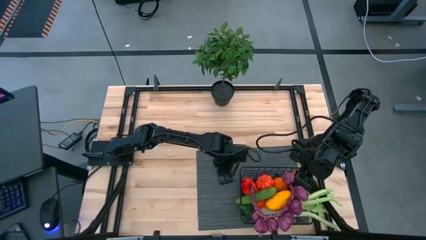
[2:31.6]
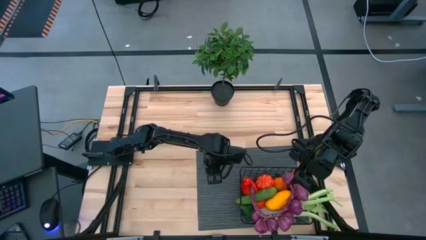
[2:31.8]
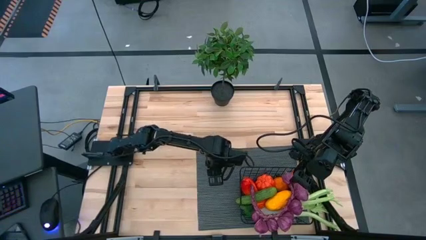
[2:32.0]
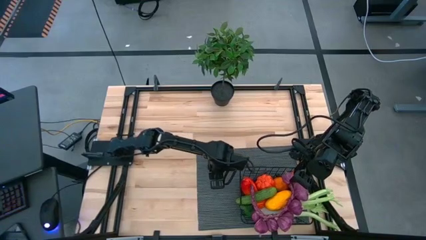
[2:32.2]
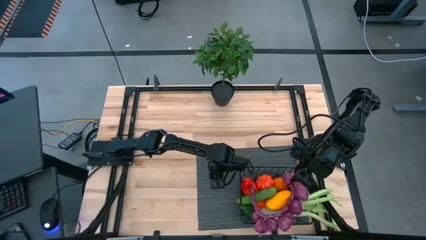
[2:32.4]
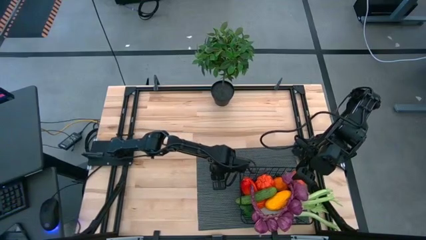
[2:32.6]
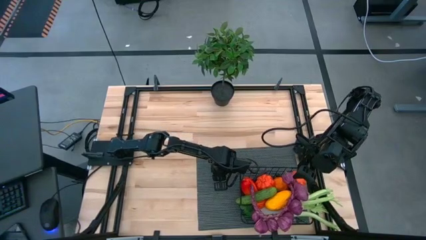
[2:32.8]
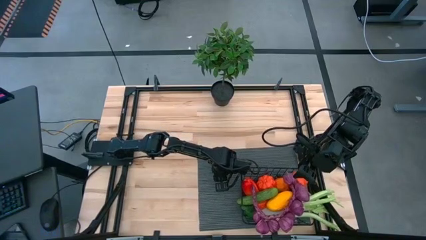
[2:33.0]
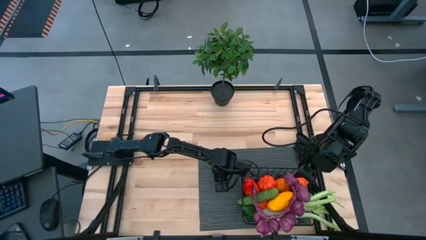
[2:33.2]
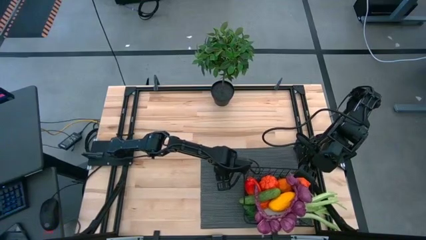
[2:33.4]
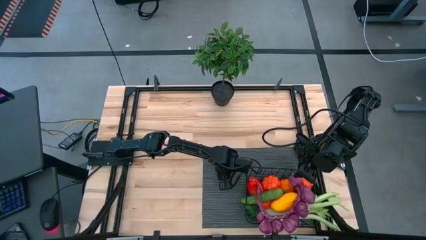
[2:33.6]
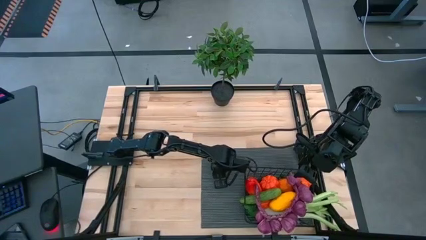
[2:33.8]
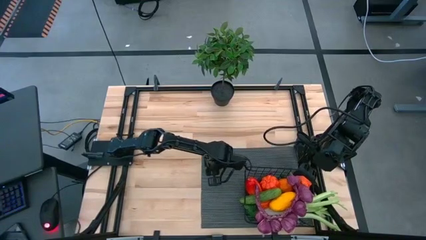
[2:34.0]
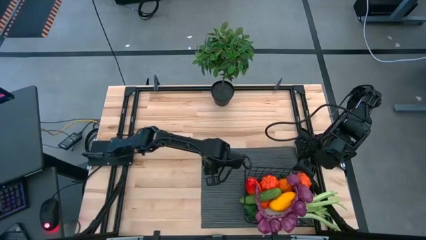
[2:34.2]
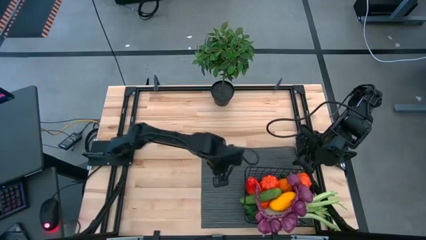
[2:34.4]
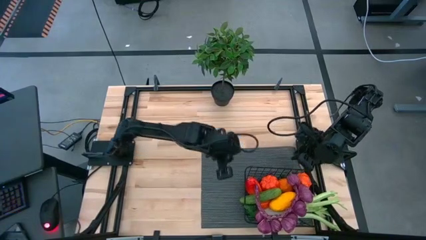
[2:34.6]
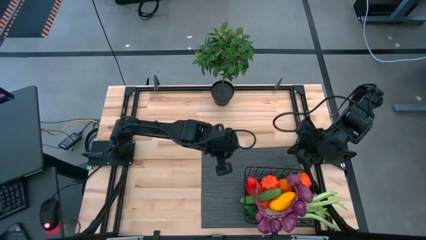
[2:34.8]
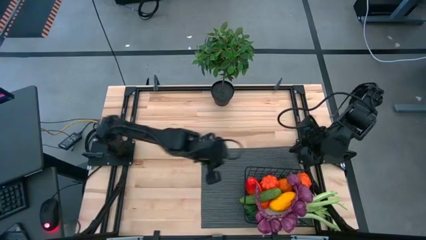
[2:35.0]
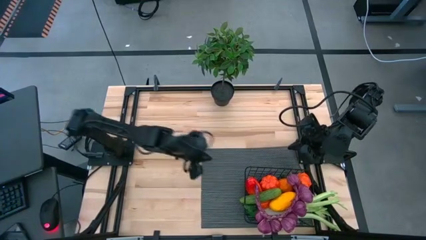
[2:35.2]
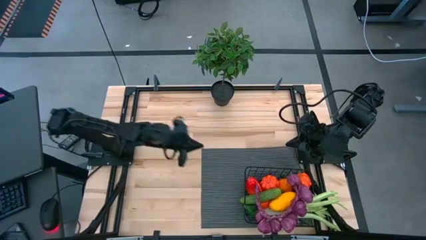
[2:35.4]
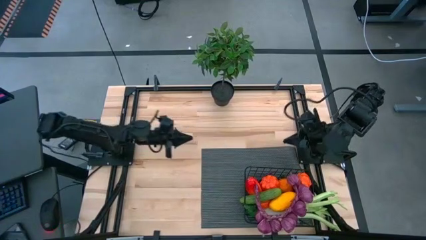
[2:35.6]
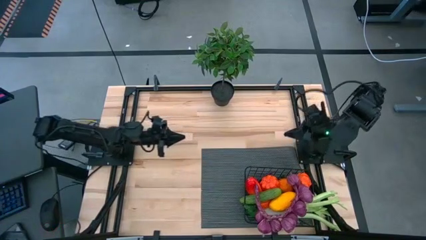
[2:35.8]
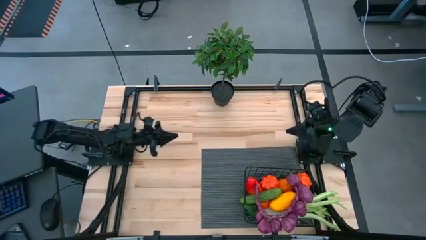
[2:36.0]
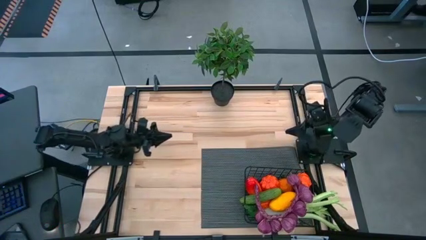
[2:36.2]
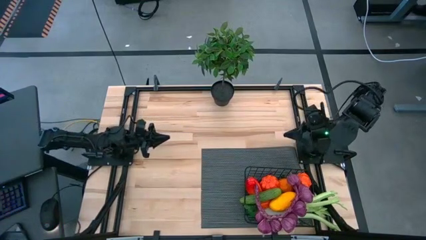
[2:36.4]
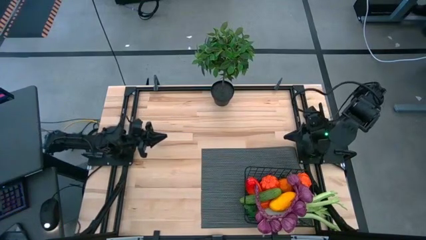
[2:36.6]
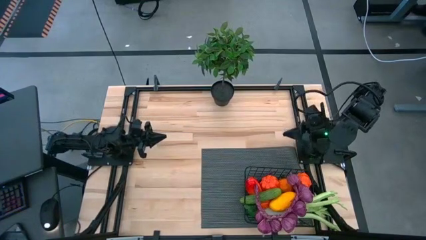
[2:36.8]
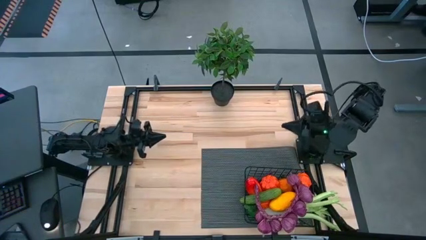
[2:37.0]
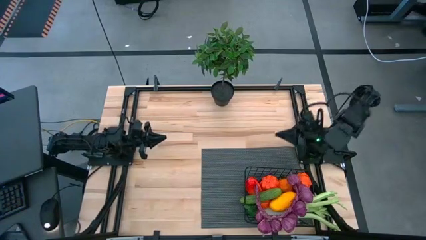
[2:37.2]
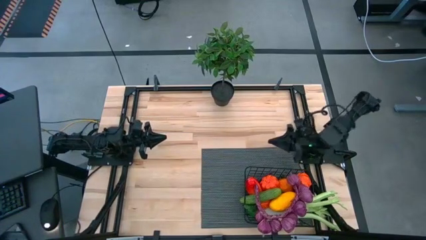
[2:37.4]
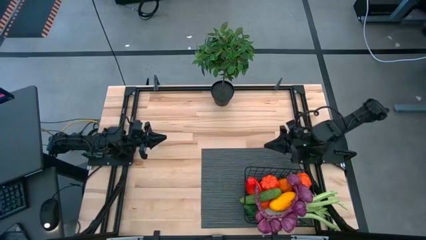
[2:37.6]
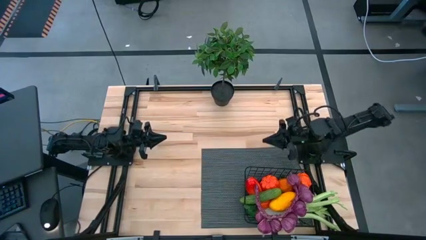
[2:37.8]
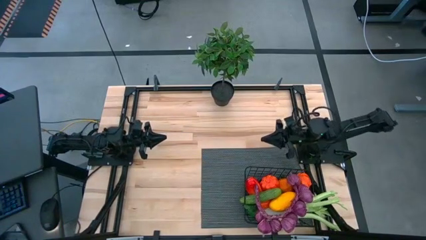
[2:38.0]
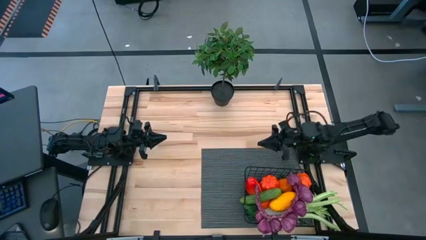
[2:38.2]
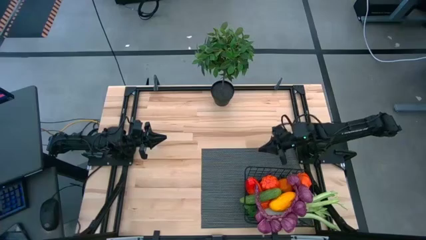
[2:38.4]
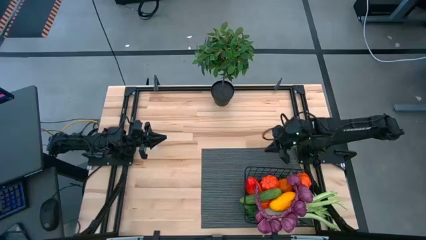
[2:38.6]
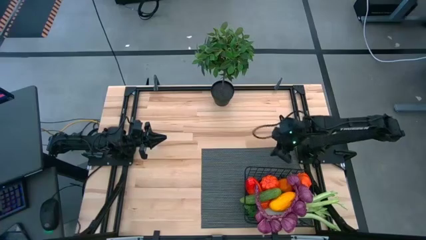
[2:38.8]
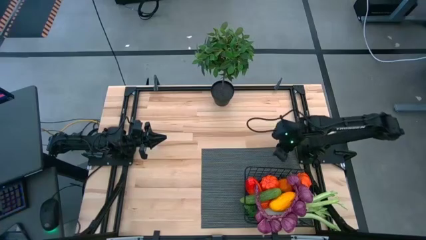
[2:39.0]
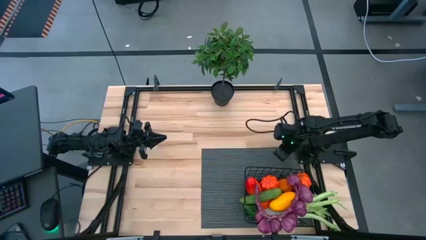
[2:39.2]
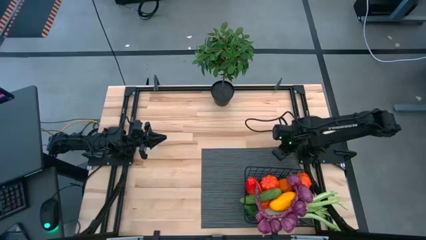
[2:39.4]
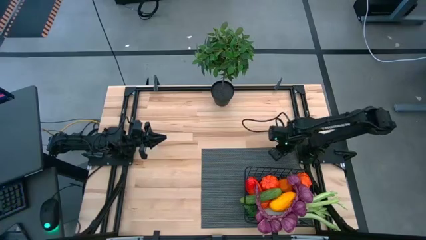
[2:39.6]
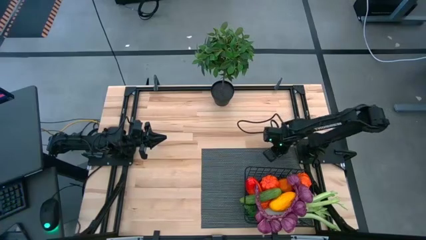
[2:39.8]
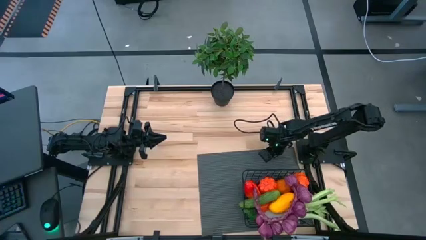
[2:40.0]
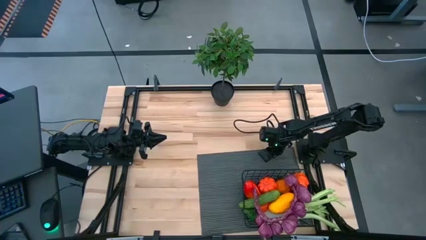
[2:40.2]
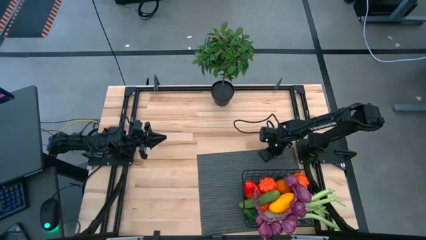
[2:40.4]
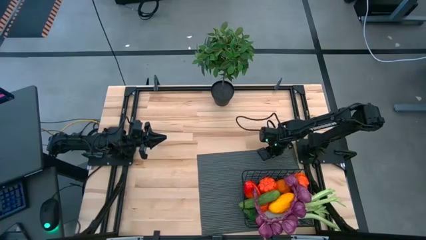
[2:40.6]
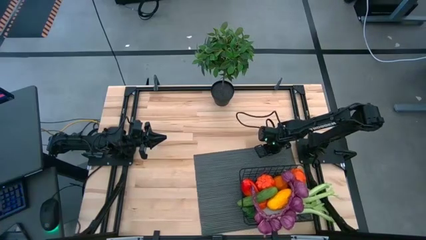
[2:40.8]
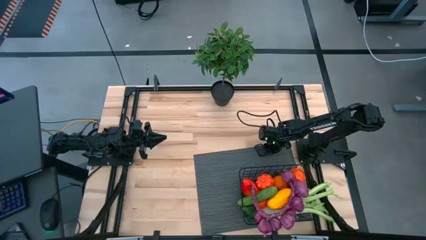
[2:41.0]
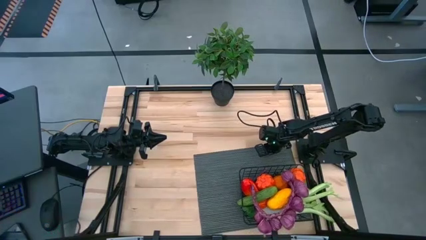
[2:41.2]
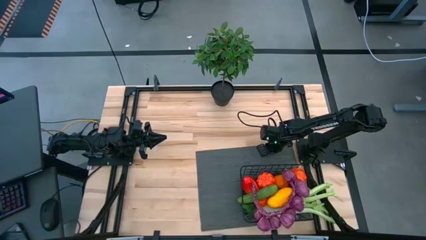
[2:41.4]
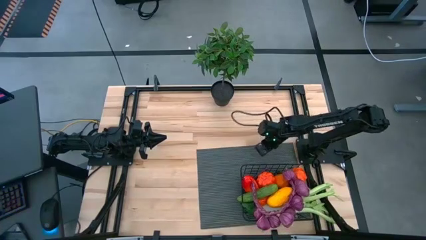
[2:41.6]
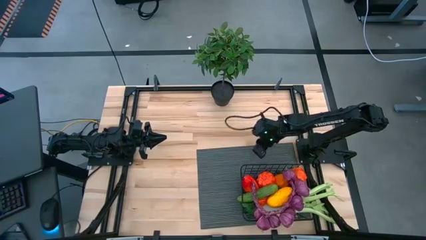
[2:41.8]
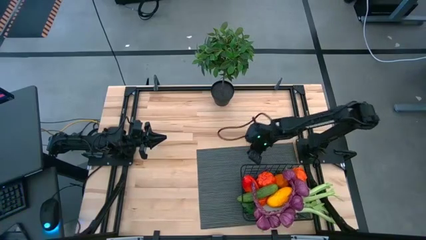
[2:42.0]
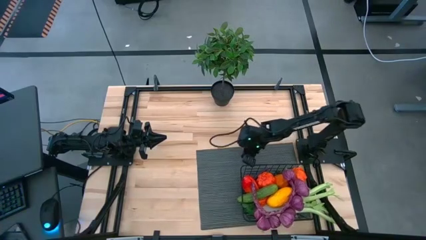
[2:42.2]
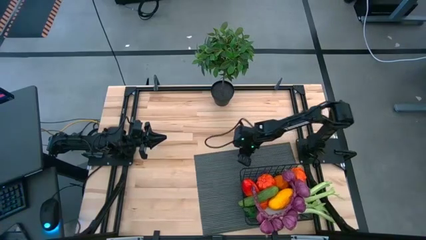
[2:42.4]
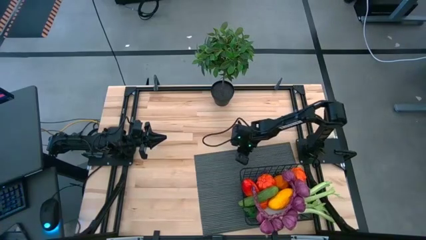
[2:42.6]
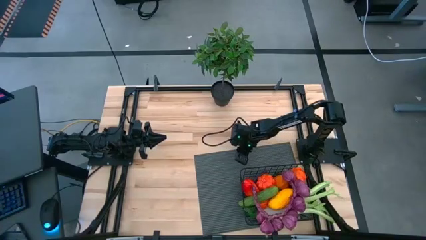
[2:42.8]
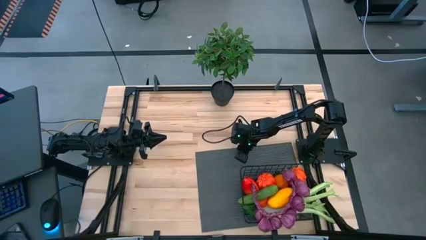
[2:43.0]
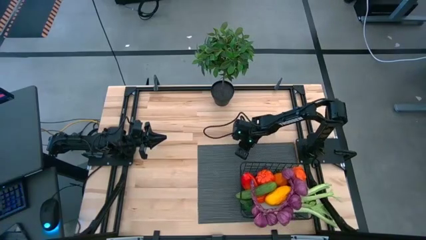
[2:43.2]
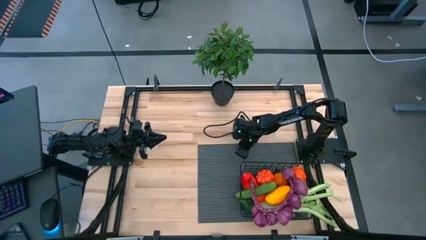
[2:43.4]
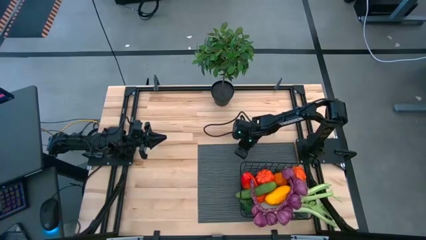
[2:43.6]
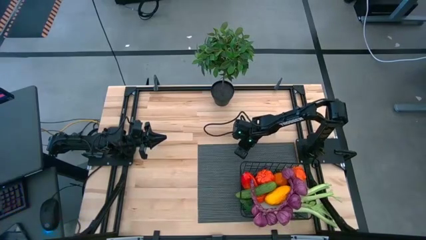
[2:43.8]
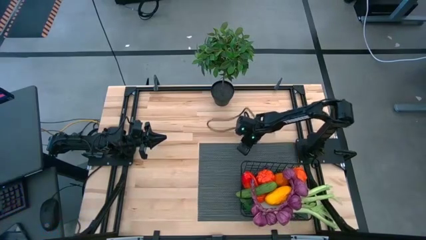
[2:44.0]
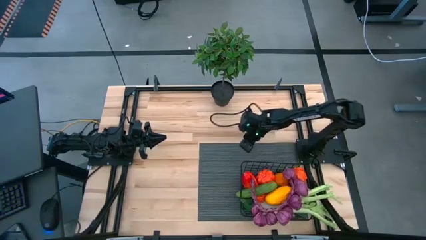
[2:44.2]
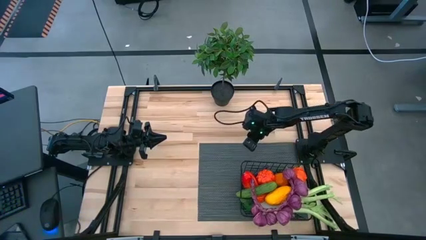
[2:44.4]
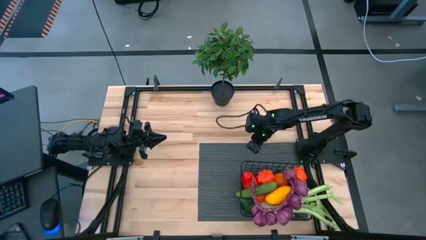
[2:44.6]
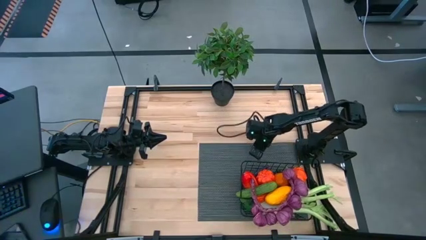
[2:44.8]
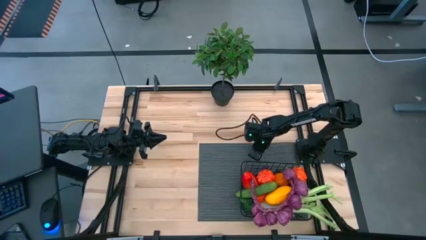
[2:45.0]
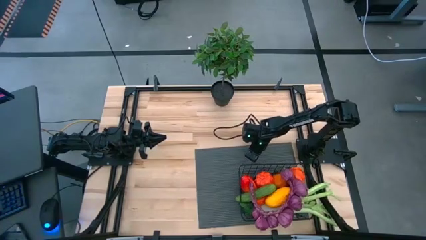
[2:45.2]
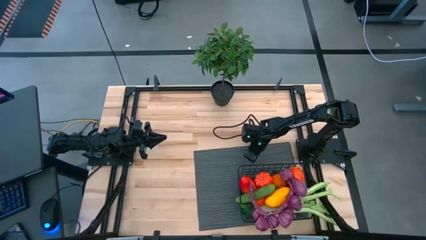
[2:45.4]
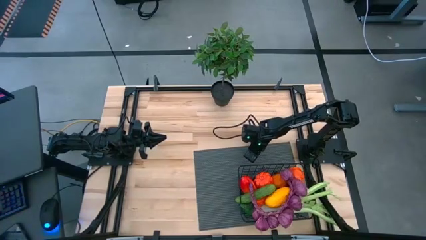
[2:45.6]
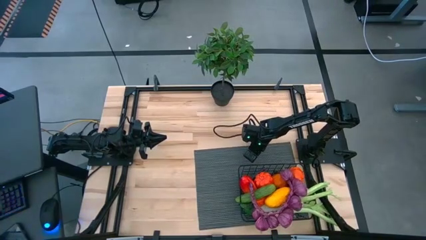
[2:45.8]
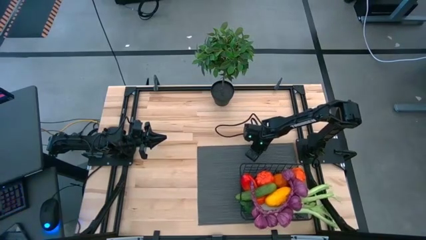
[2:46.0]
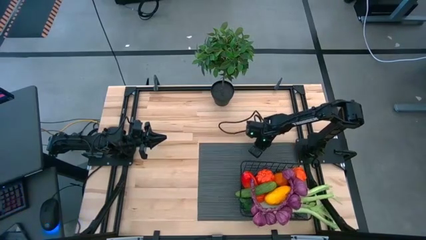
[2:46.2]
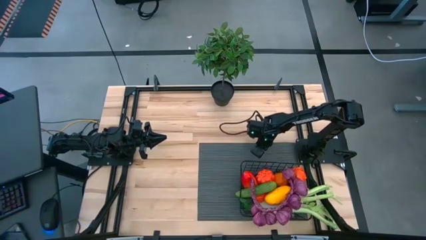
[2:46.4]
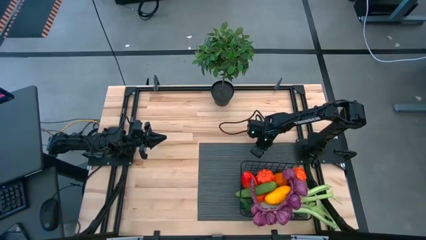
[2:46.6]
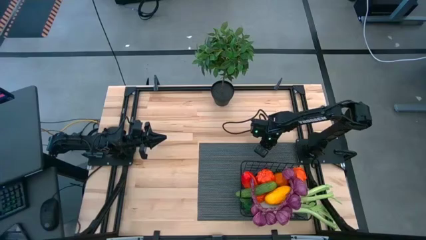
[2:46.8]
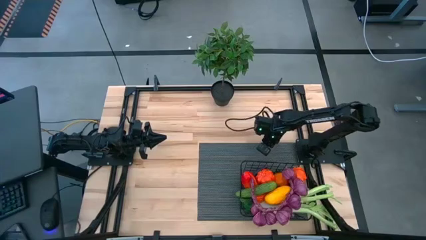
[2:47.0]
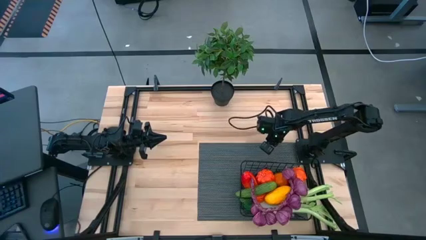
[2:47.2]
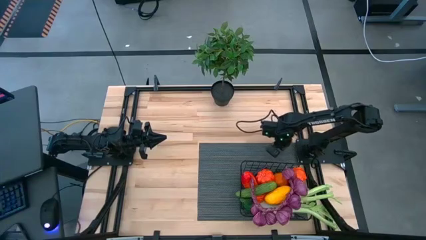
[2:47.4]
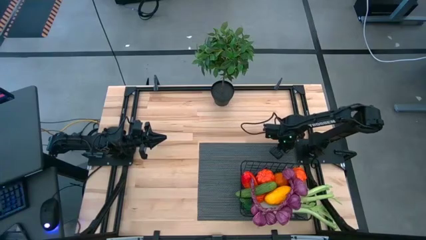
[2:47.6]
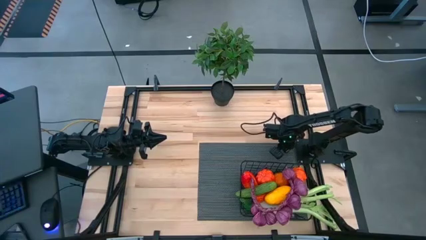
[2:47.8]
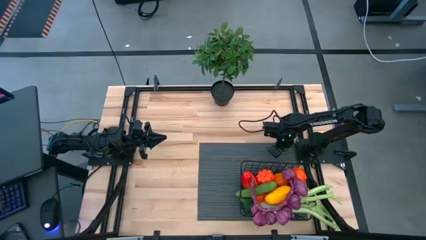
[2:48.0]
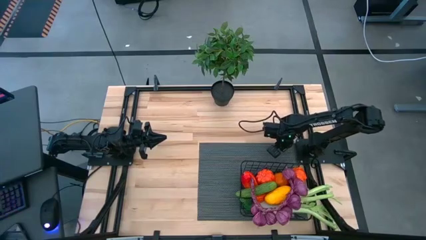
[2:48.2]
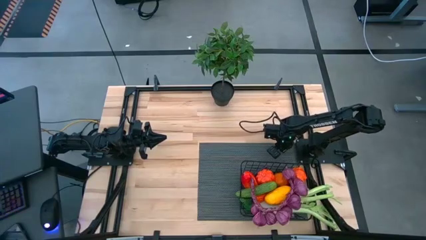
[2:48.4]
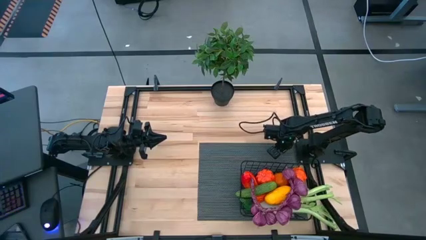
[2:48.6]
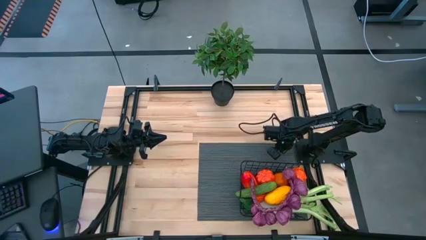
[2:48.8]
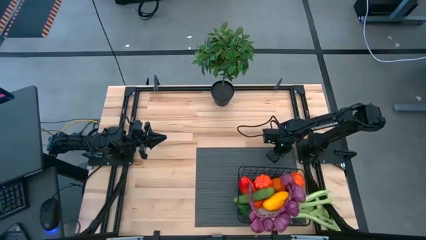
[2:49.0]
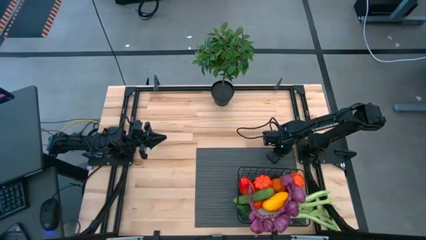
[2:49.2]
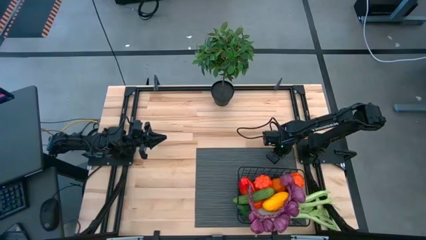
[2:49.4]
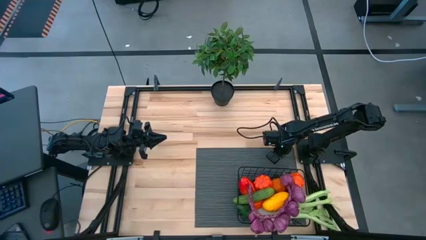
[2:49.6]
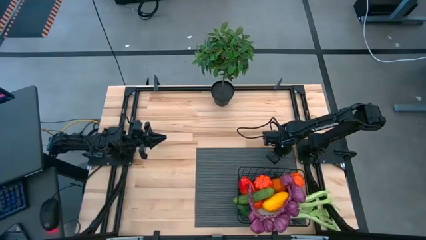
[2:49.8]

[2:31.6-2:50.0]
Task: Build produce basket
Adjust the gray table mat
